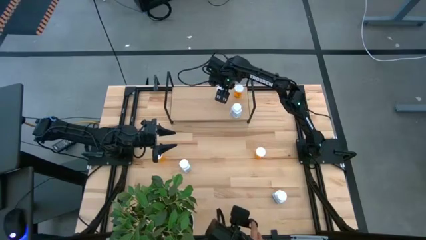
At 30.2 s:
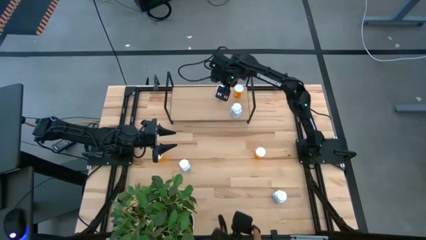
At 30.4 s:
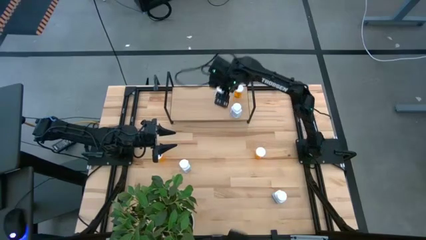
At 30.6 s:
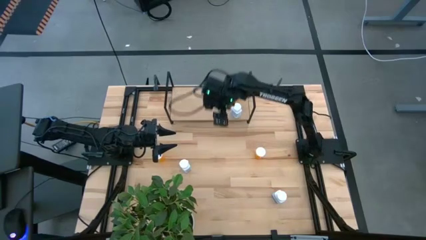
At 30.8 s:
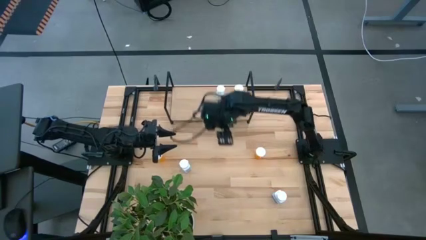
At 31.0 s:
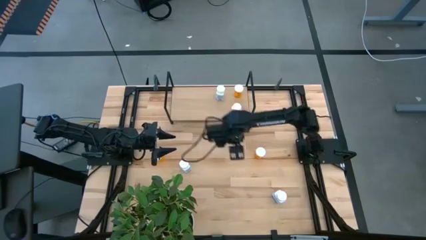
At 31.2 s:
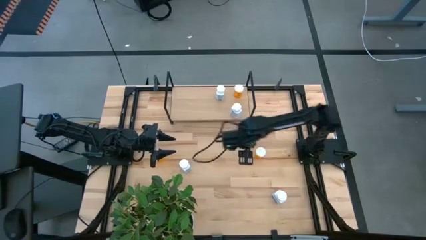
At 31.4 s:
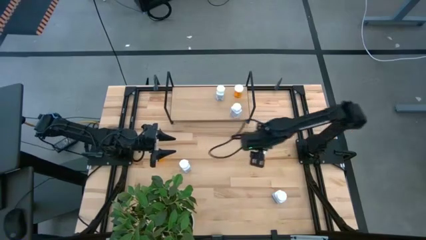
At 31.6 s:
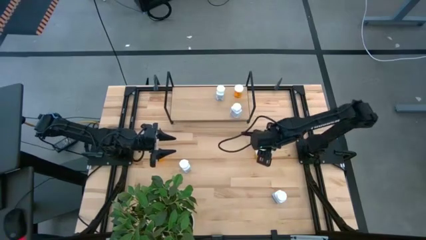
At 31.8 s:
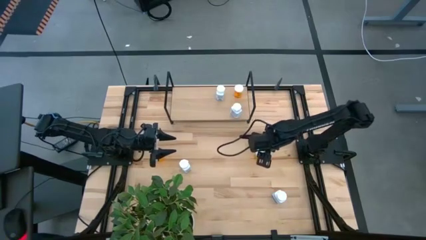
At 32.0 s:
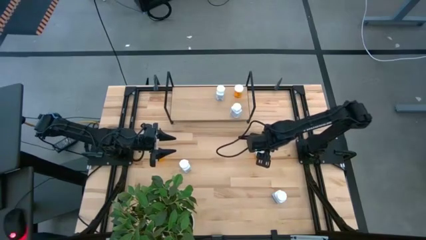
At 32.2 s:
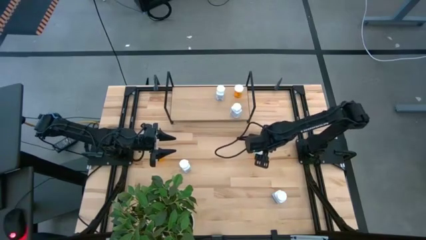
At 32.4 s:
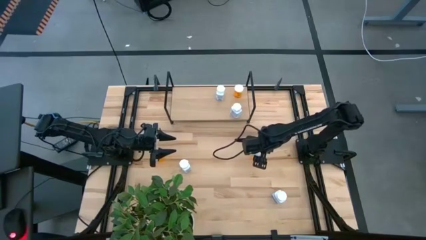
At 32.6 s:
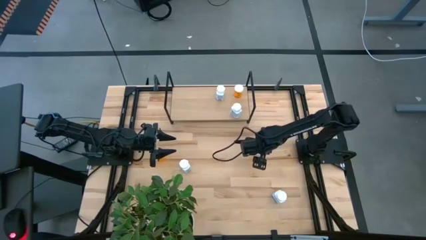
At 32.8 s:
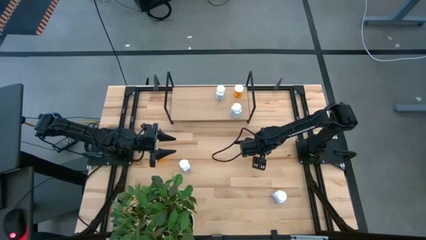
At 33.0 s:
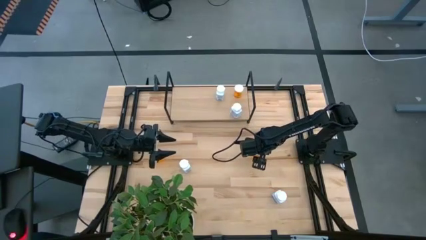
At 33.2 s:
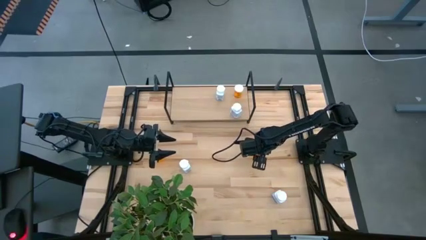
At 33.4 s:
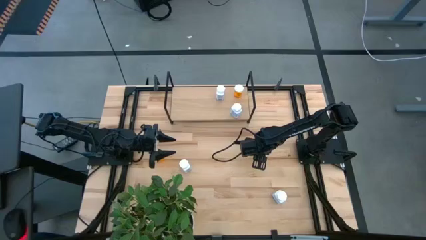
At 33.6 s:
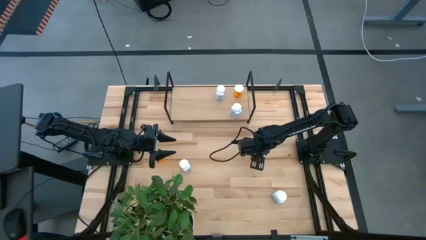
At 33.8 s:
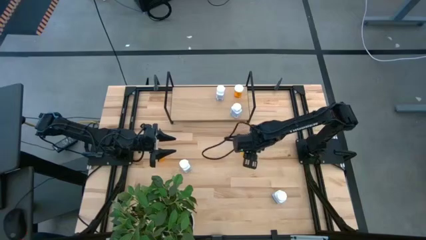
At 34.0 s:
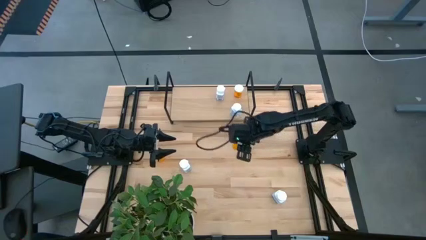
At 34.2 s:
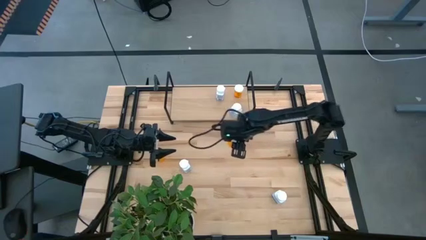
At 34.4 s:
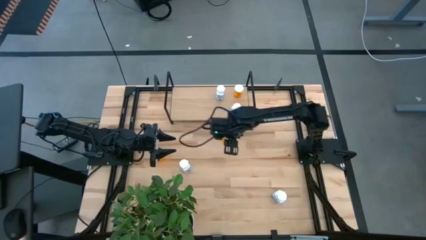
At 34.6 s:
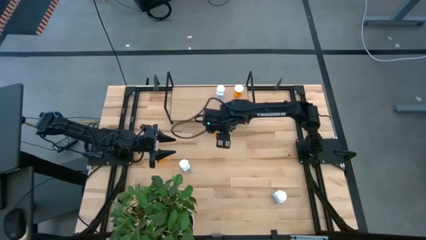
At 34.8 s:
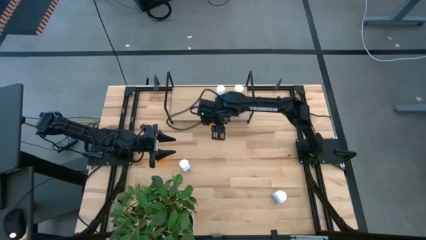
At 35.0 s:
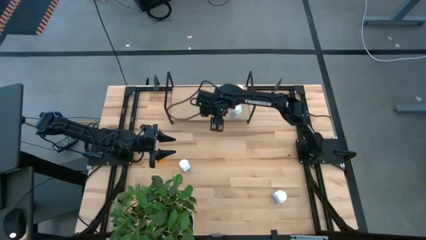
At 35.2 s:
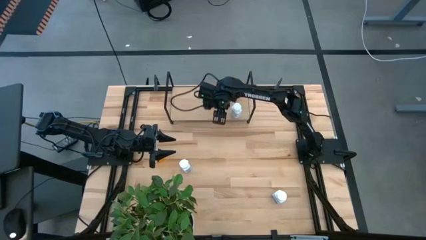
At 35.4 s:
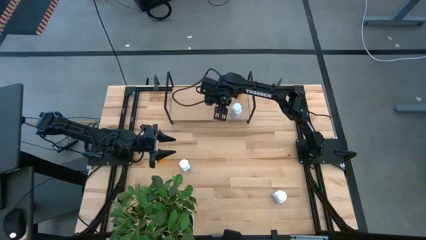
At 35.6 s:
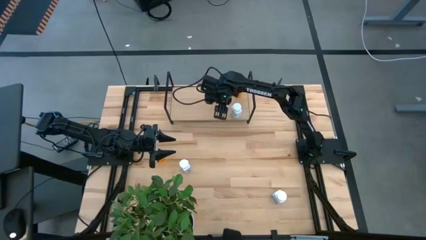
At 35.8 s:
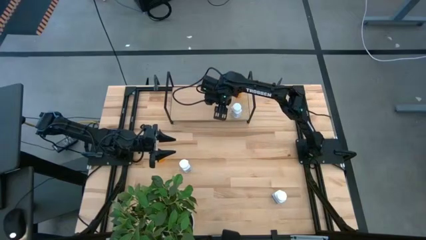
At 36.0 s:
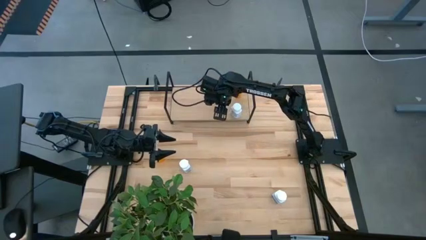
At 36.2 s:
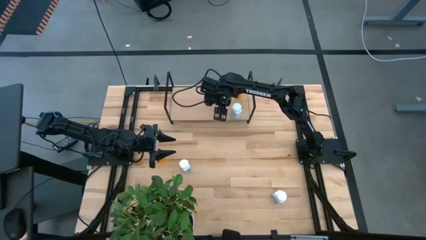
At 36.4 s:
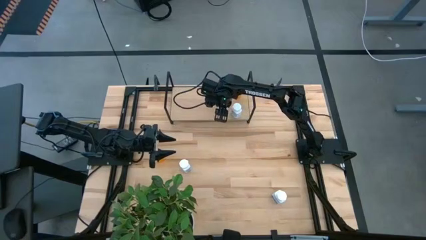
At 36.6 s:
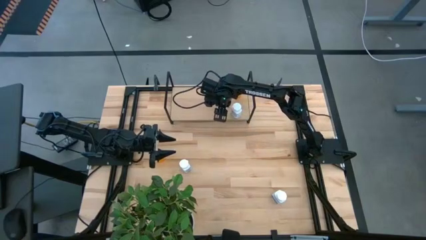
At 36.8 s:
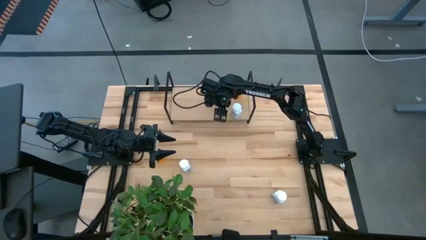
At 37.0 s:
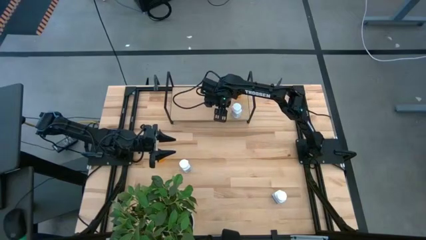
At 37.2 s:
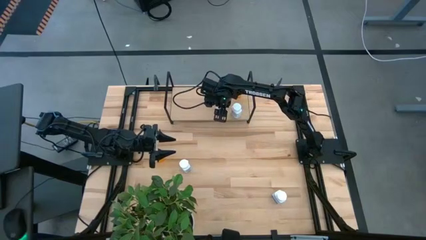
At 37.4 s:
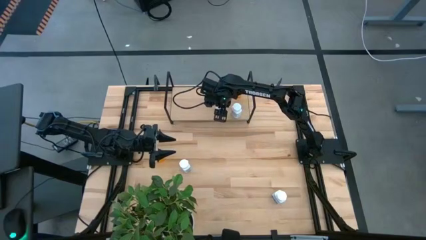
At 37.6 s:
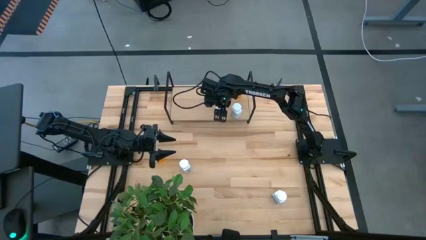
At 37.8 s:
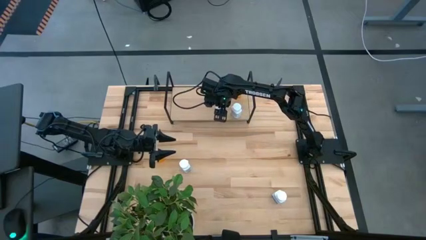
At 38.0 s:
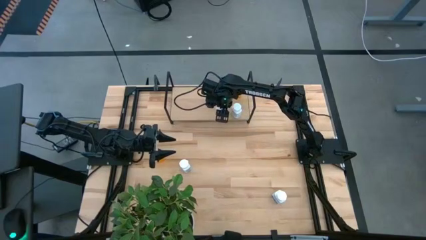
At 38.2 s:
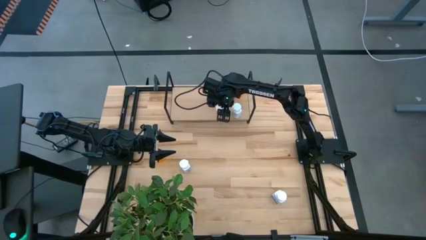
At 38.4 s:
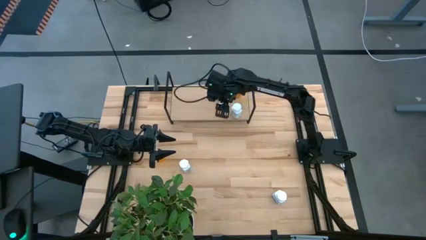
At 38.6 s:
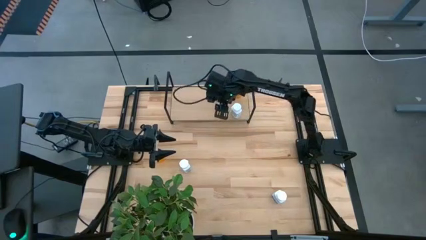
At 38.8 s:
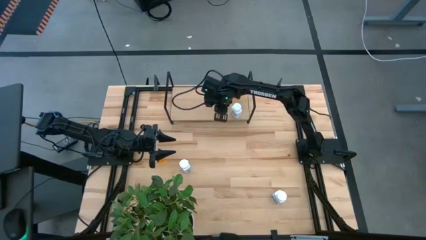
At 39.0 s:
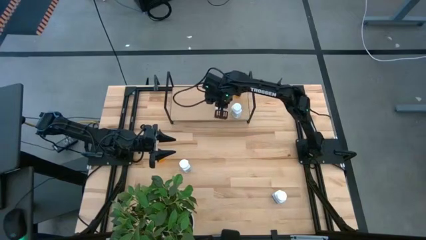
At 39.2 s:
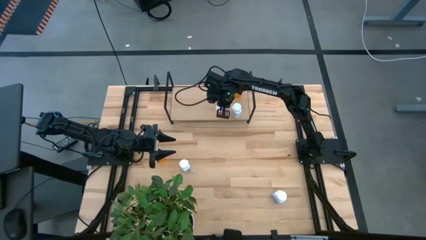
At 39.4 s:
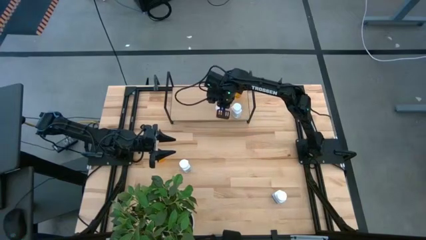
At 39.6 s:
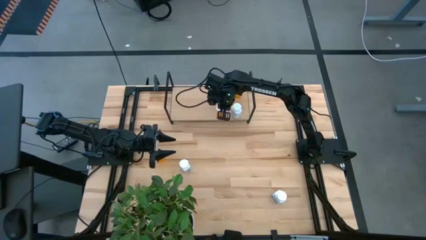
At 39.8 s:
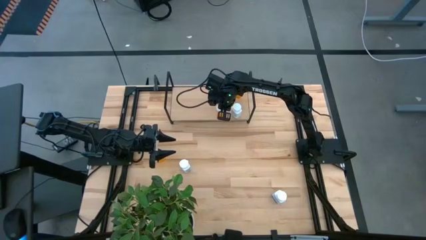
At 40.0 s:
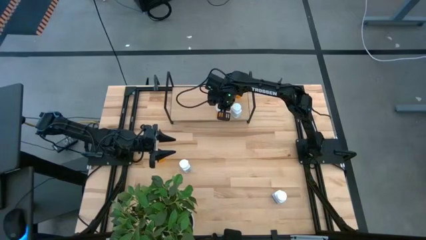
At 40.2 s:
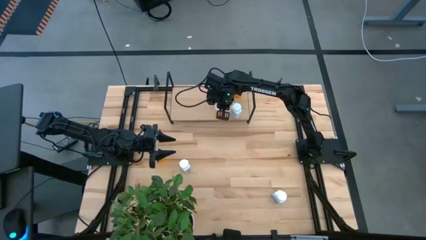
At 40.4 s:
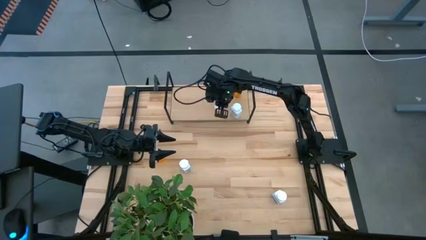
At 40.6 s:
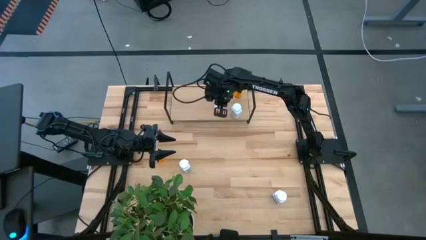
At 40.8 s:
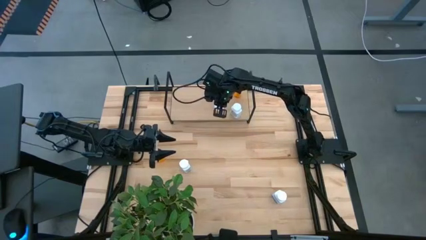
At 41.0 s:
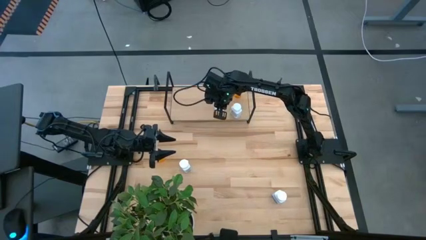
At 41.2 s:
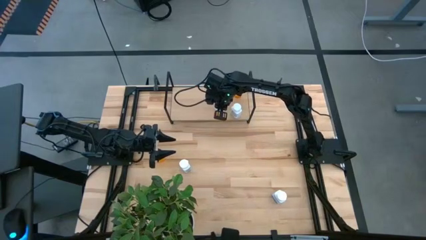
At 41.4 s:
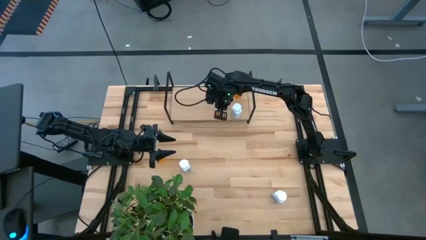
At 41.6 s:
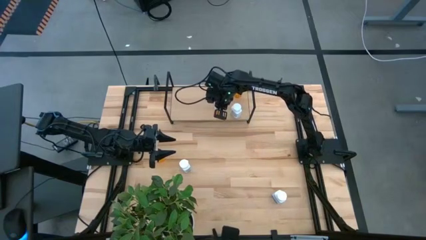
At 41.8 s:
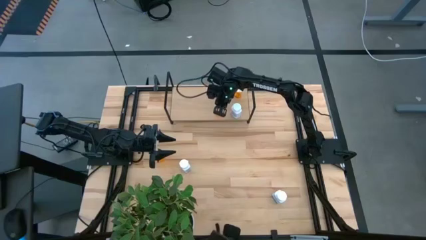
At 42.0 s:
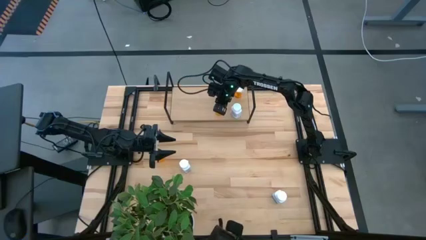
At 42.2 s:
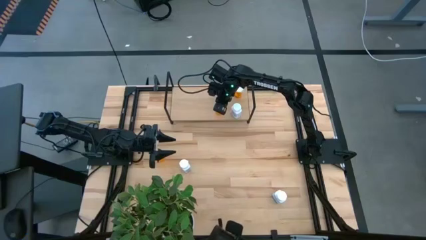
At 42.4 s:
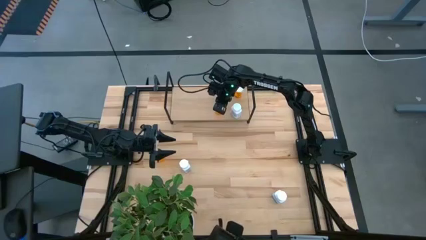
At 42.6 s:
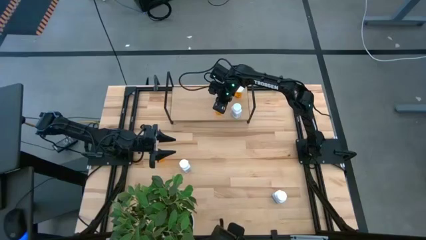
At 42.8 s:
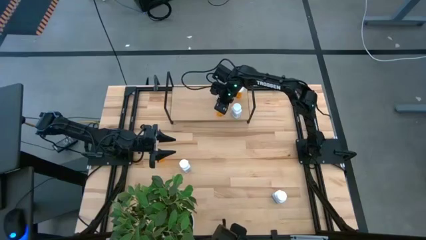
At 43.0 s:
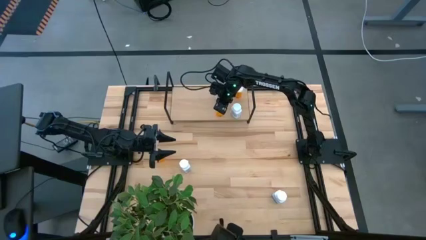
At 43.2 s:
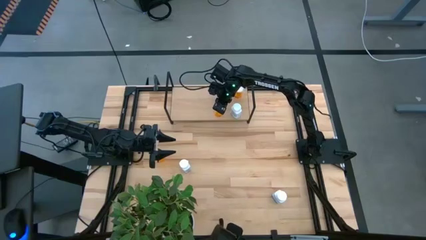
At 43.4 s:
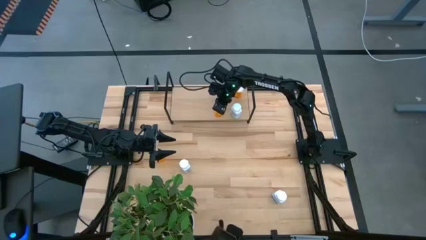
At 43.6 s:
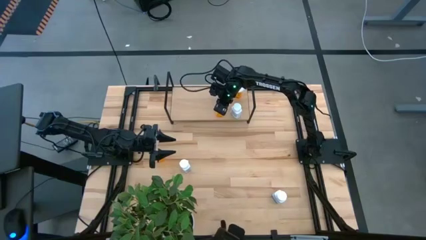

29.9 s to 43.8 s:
Task: Pick and place medicine bottles onto shelf by color
Put the orange pill bottle on the shelf
